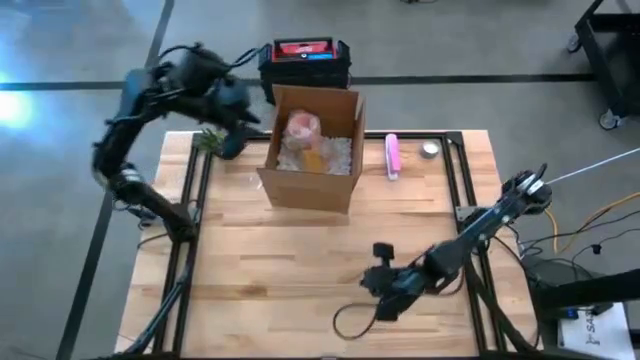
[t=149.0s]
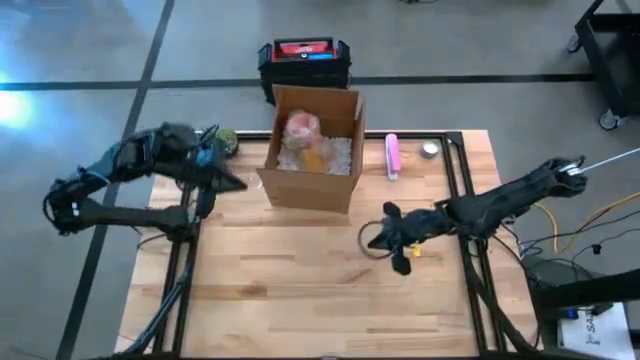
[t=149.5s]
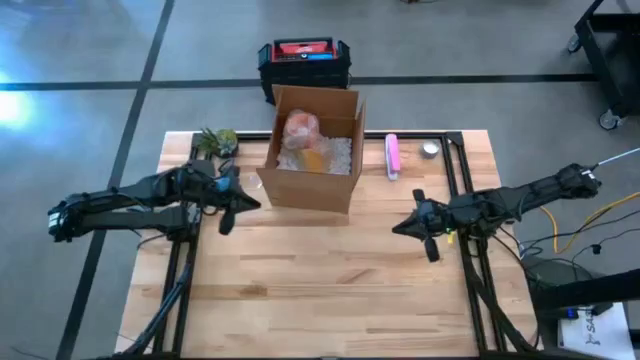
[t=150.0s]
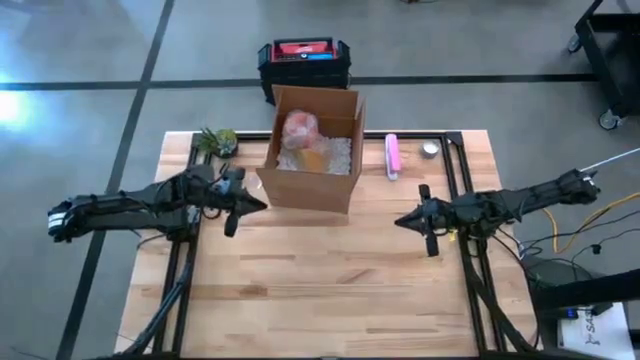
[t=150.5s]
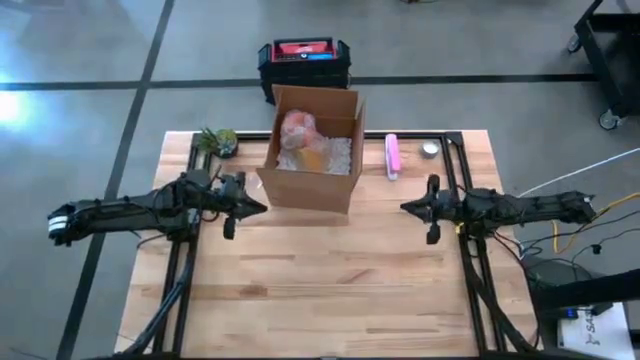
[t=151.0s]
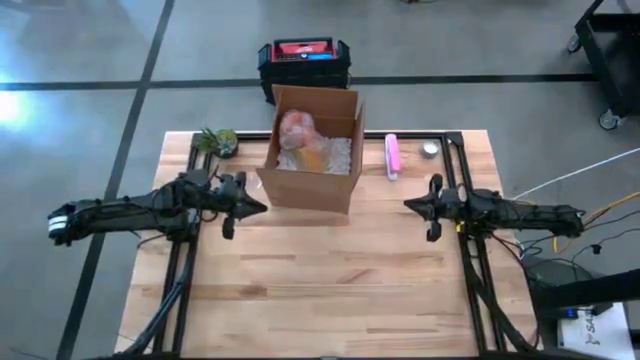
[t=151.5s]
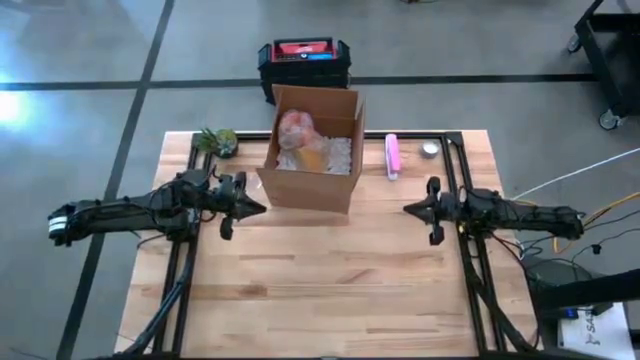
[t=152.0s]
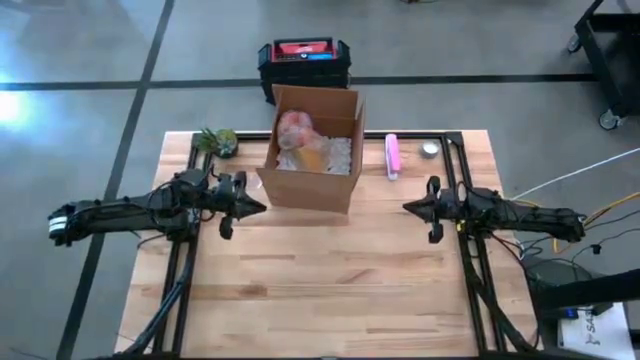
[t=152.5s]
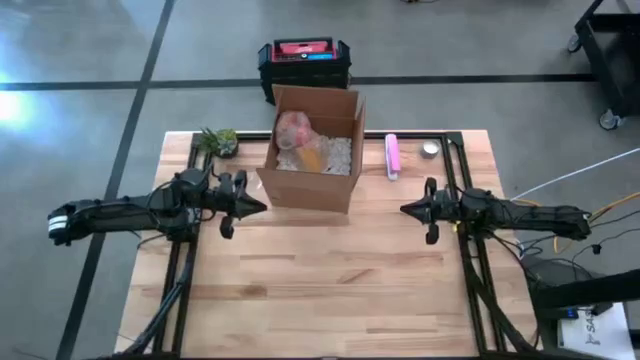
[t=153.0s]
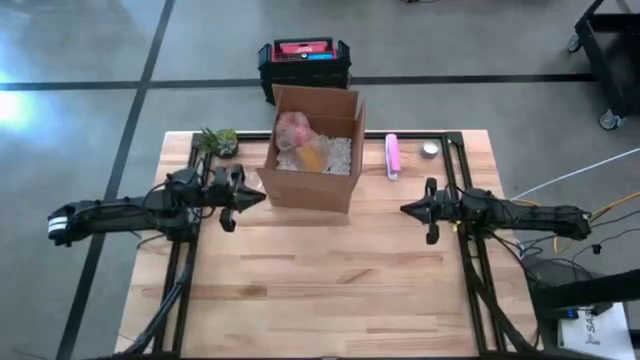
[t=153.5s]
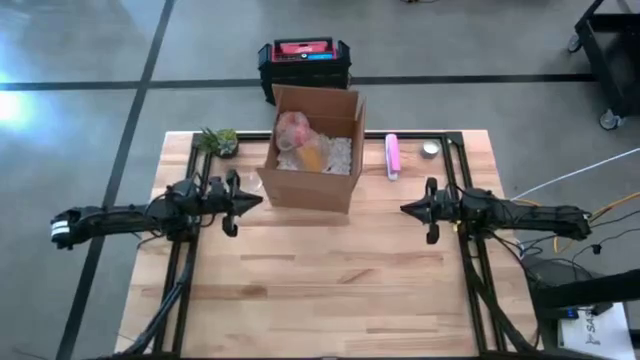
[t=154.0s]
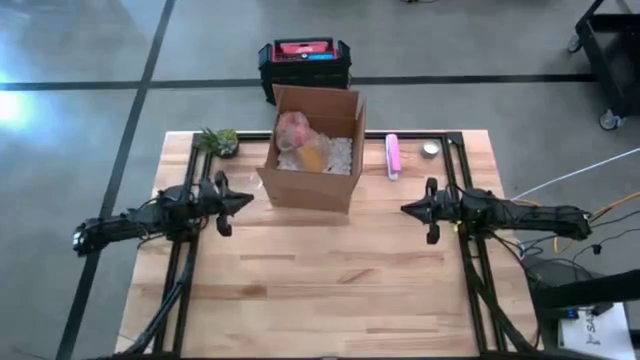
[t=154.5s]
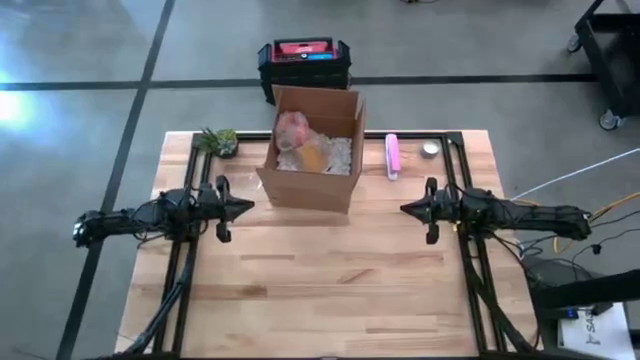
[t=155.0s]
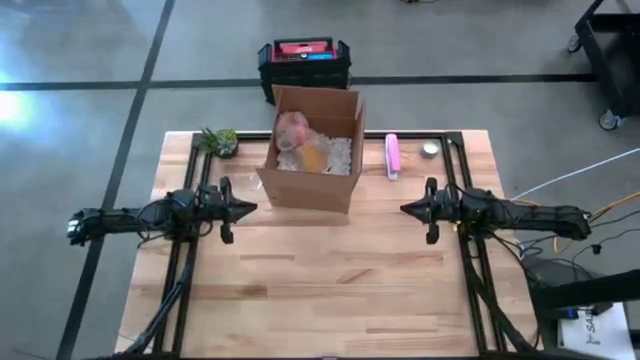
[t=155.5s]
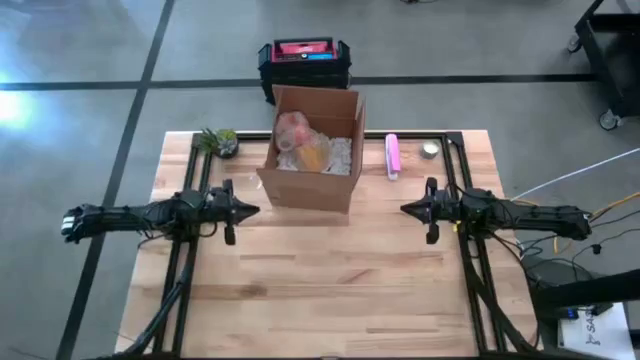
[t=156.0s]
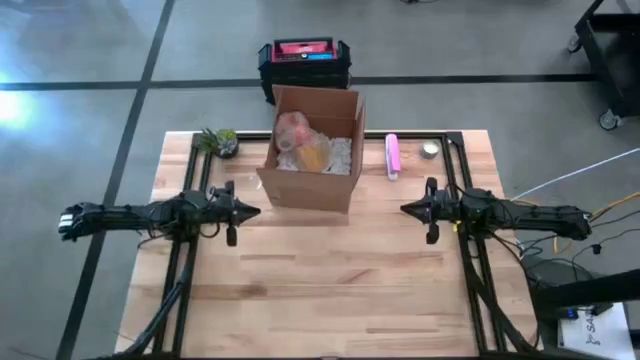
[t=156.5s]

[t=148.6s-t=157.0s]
Task: wrap mug
Return to Home Position

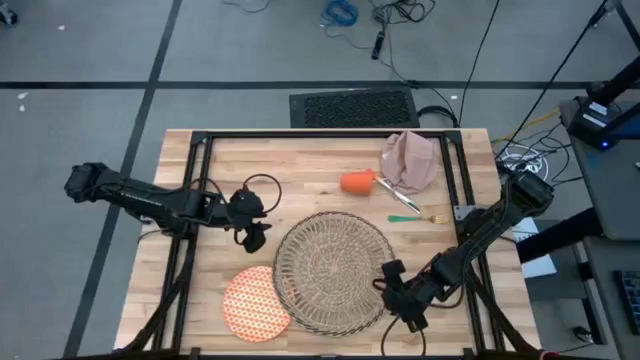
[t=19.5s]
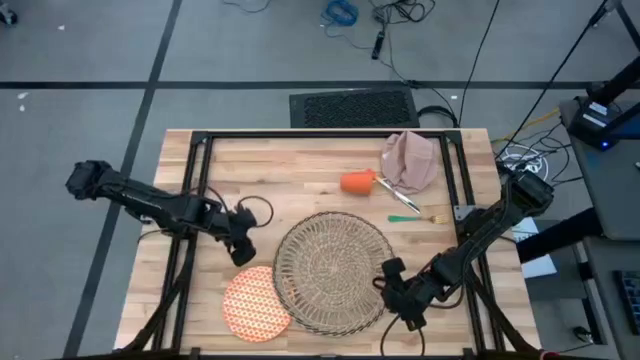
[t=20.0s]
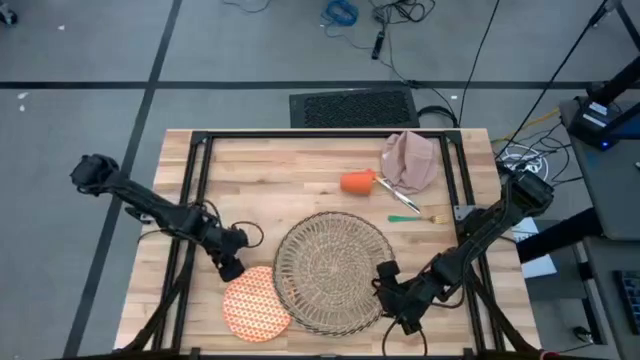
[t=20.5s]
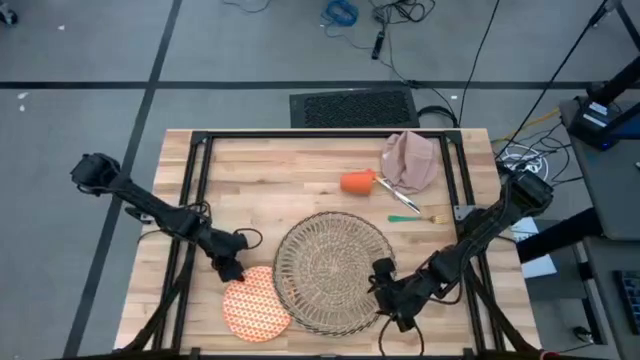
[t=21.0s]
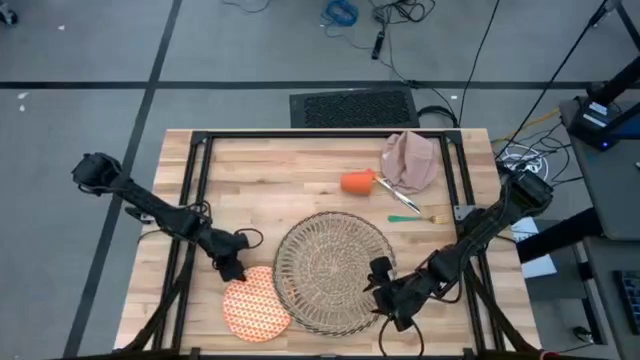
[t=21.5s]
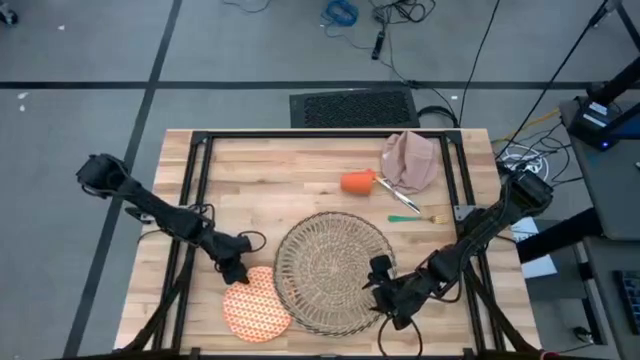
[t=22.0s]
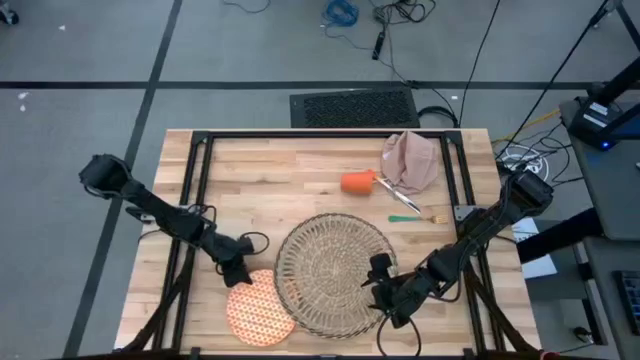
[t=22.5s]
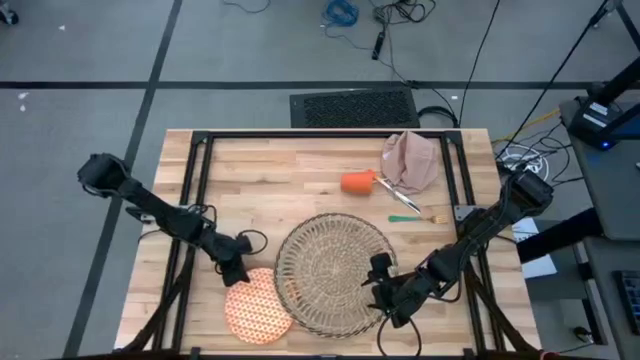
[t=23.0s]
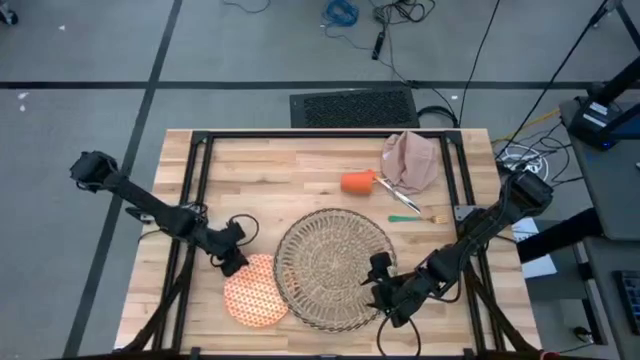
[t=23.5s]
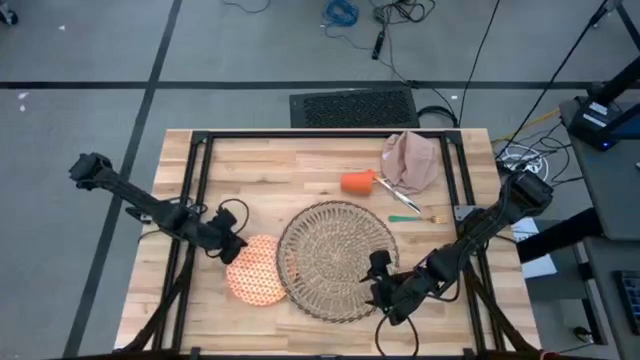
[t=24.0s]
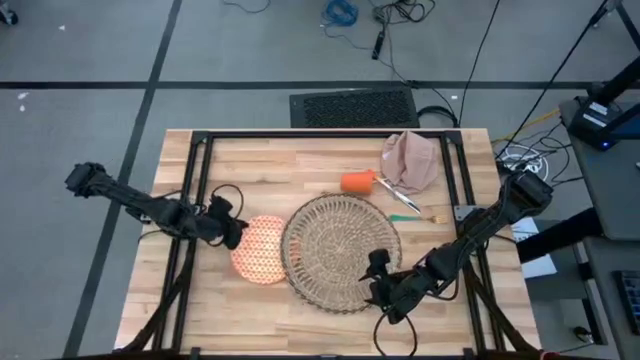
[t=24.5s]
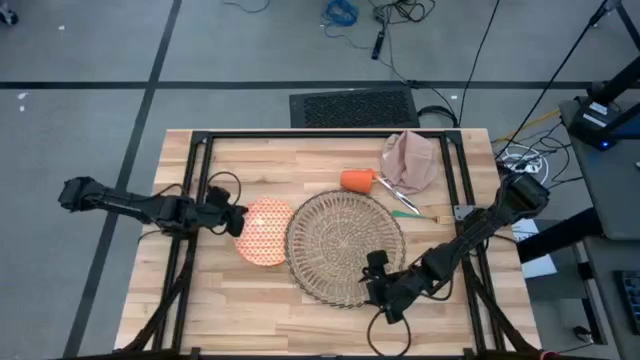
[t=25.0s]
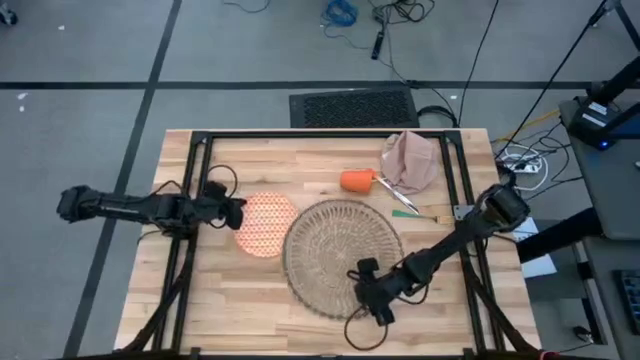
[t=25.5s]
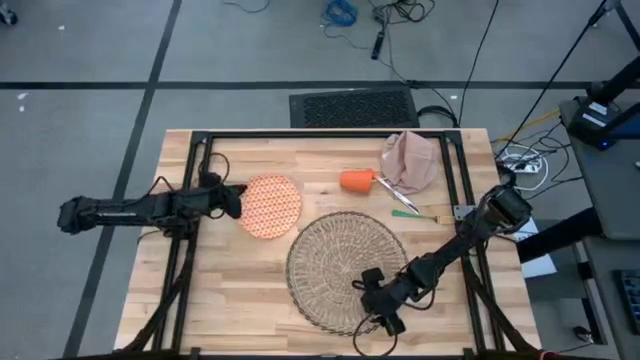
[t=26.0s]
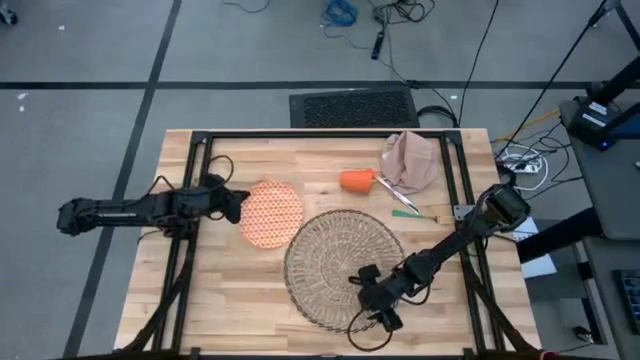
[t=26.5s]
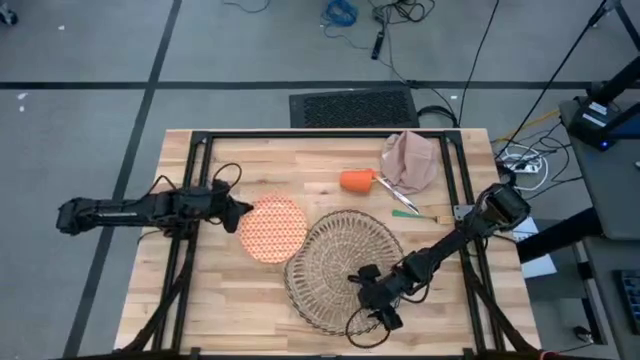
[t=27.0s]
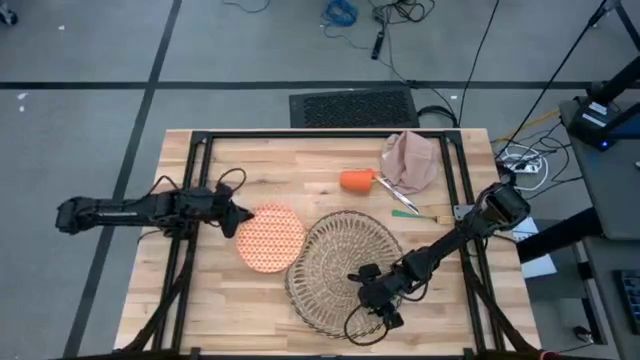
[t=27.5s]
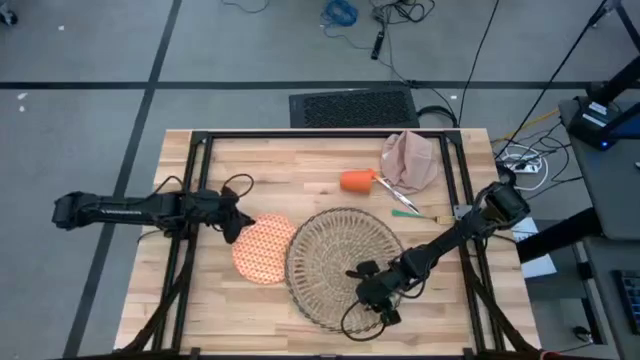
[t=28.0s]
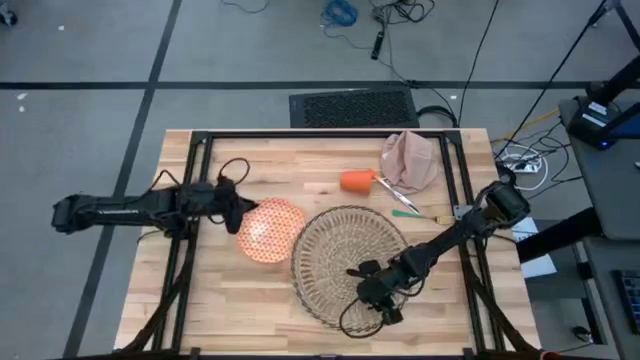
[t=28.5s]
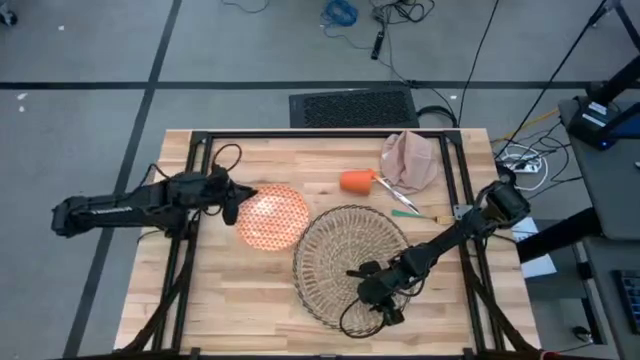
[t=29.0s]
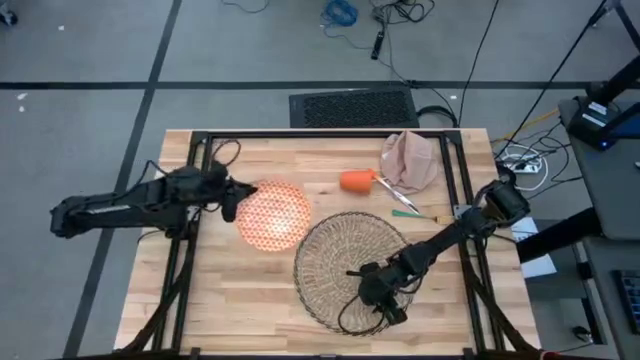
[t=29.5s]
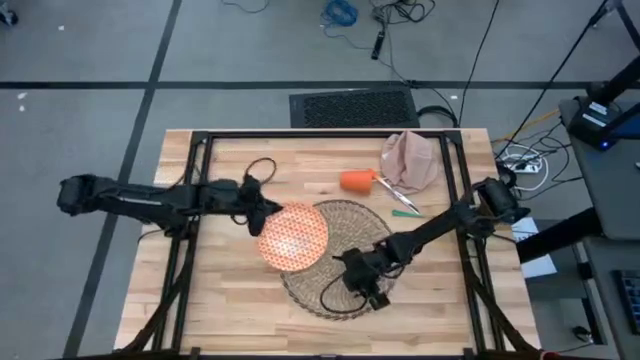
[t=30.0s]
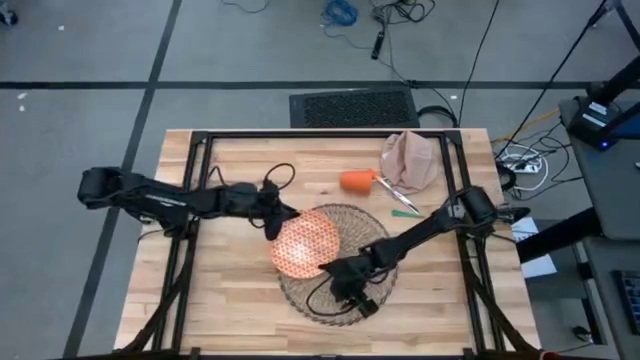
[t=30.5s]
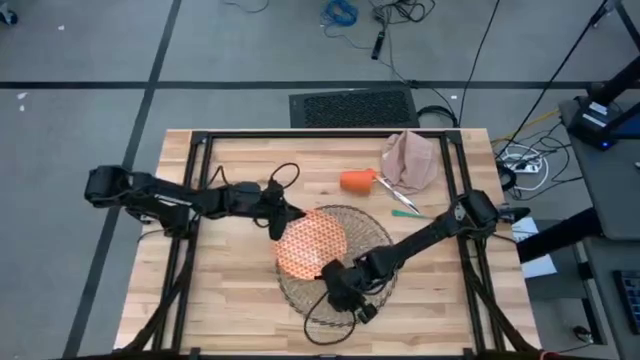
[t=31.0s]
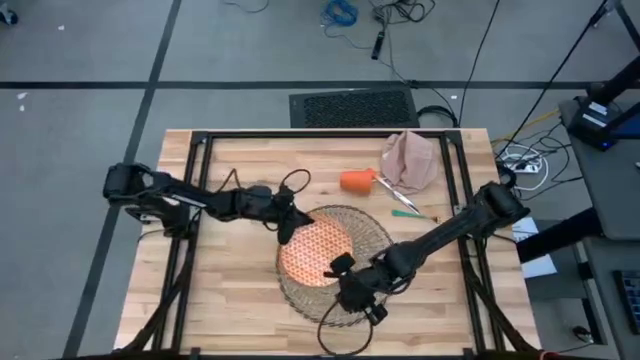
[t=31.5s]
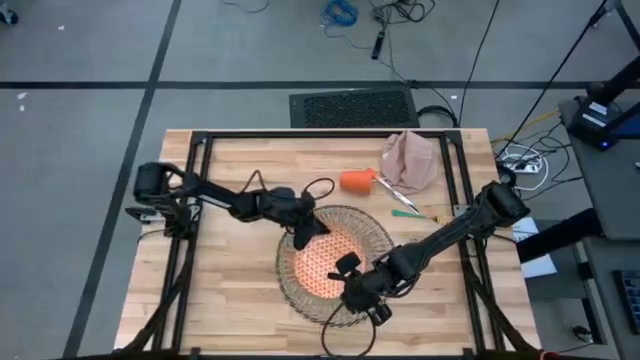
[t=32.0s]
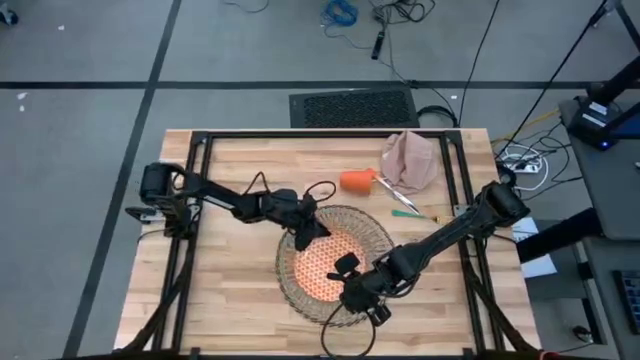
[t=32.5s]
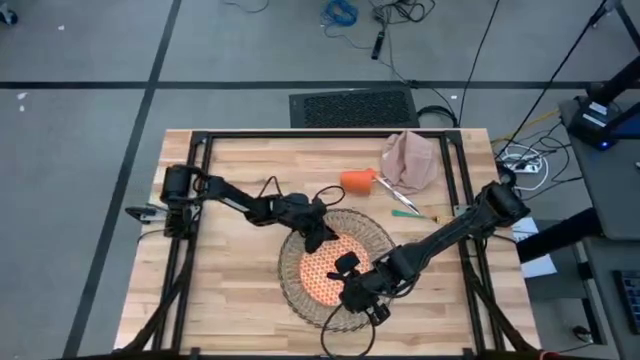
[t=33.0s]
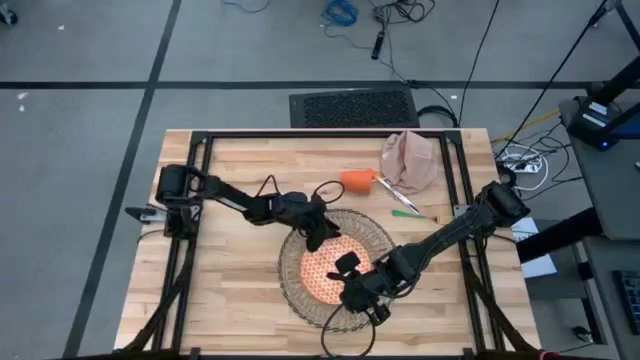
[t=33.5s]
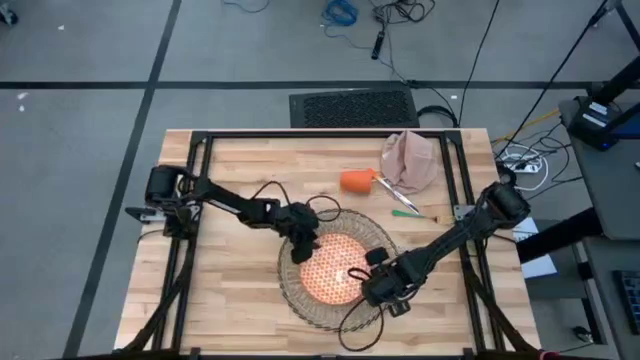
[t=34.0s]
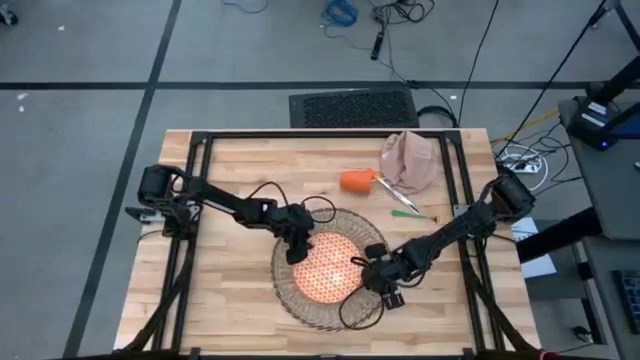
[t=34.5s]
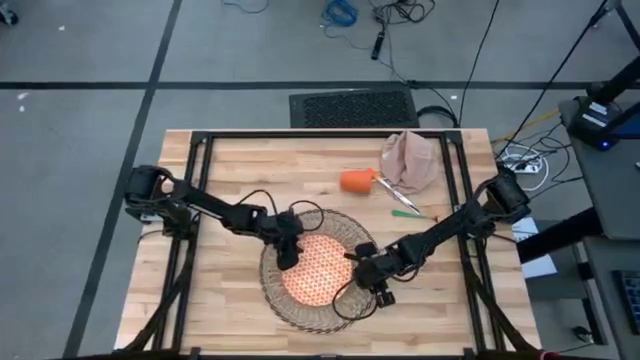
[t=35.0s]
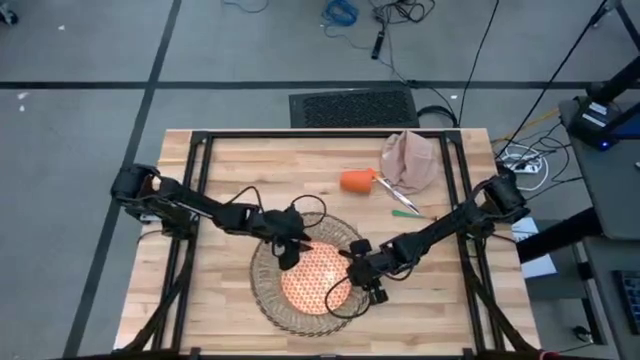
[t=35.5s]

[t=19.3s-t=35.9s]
Task: Set table place
Put the orange plate on the brown mat
